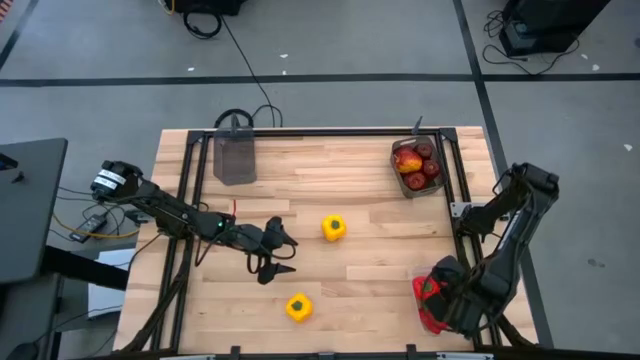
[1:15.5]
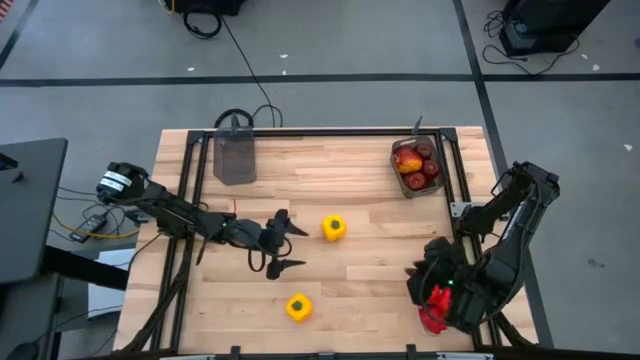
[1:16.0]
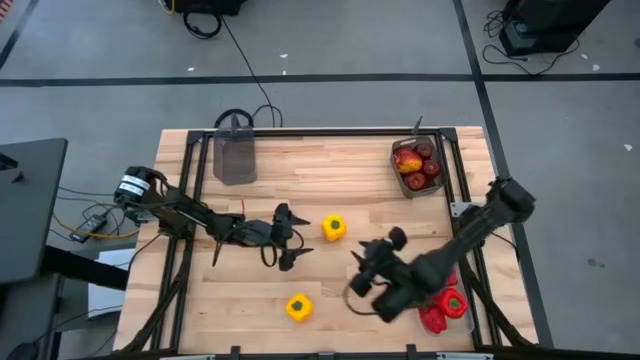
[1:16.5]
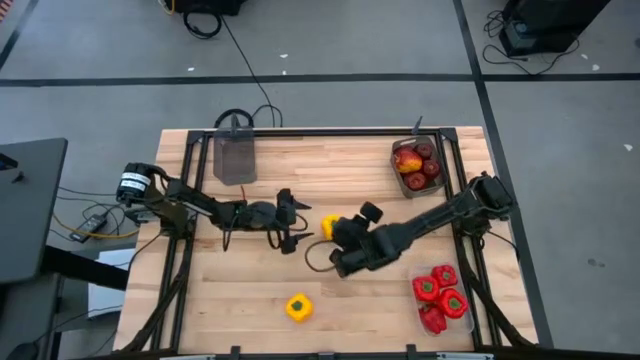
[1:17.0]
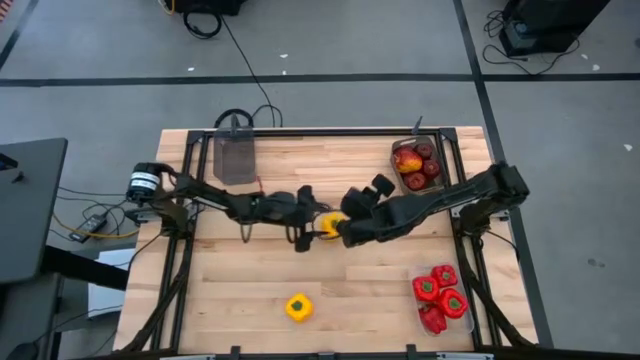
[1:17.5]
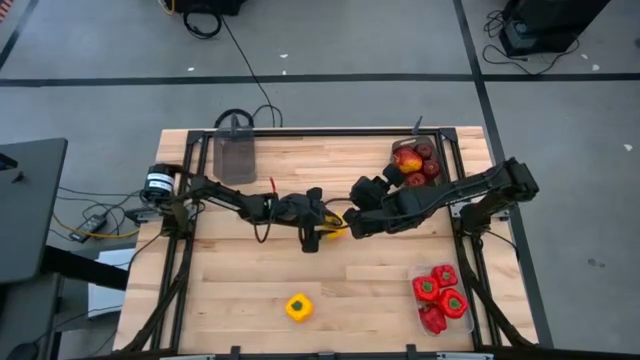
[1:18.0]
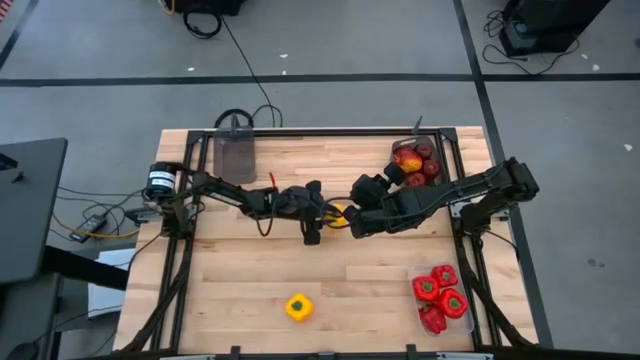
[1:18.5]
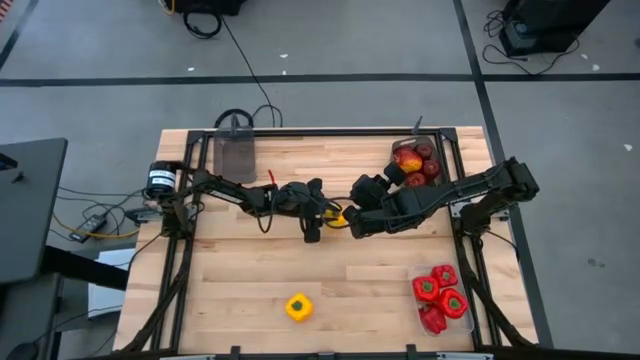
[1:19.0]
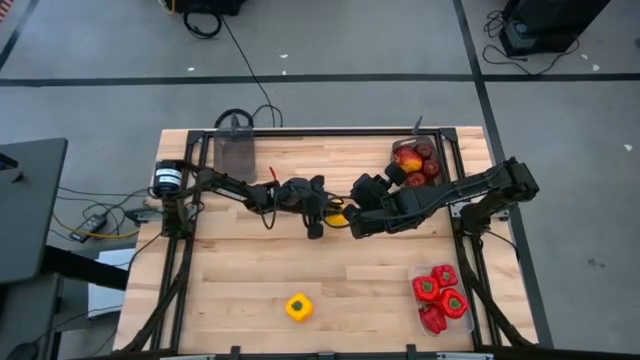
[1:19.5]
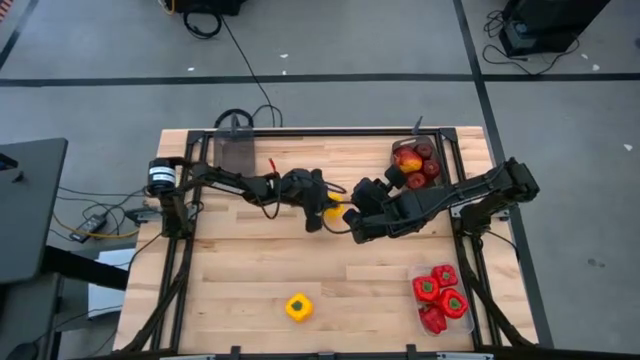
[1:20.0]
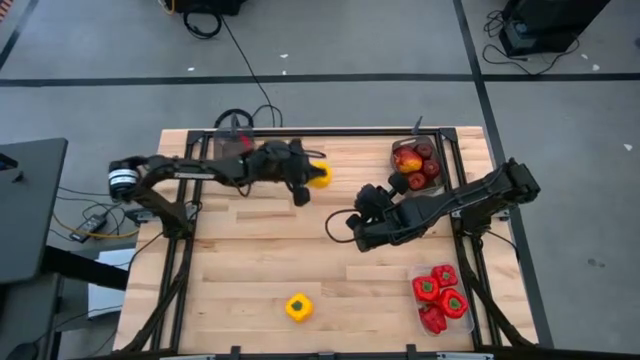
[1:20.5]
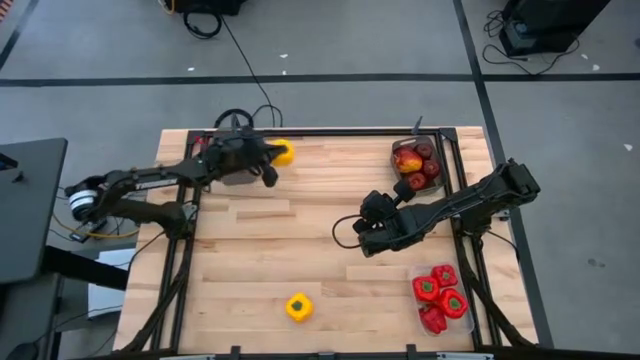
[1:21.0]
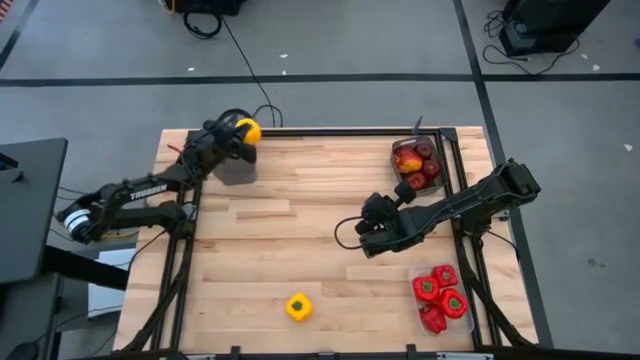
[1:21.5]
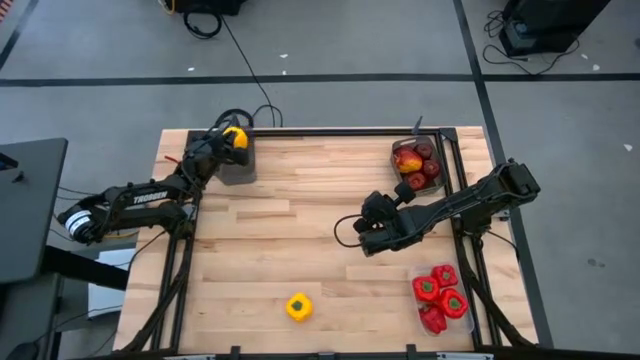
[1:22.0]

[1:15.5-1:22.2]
Task: Sort produce into baskets
Put the top yellow bell pepper into the left dark gray bin

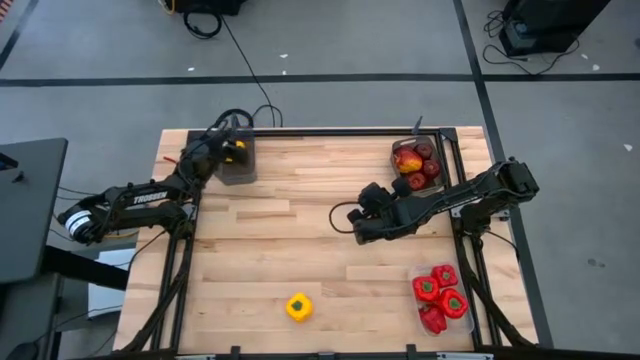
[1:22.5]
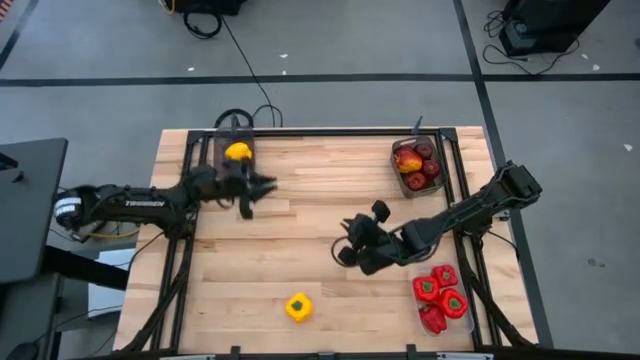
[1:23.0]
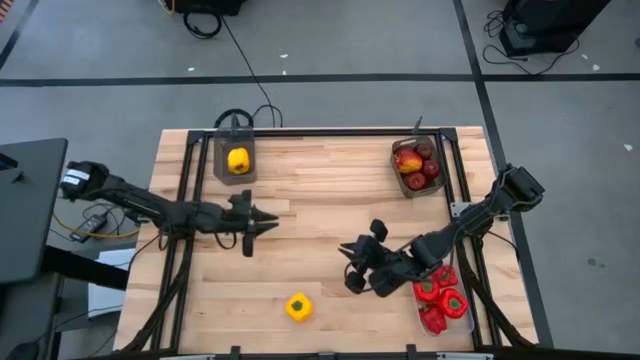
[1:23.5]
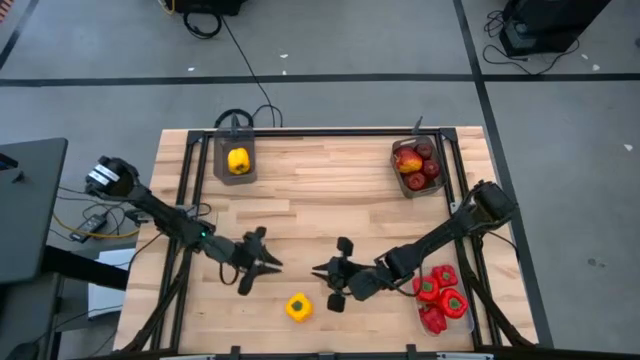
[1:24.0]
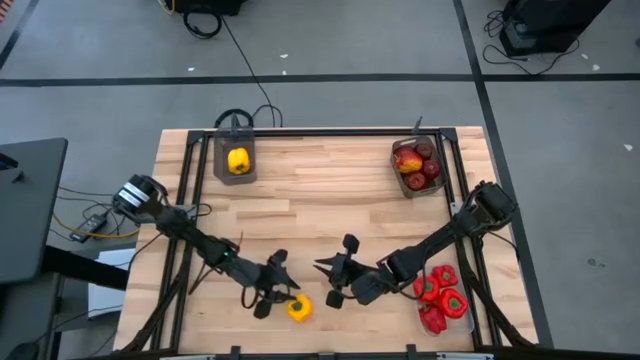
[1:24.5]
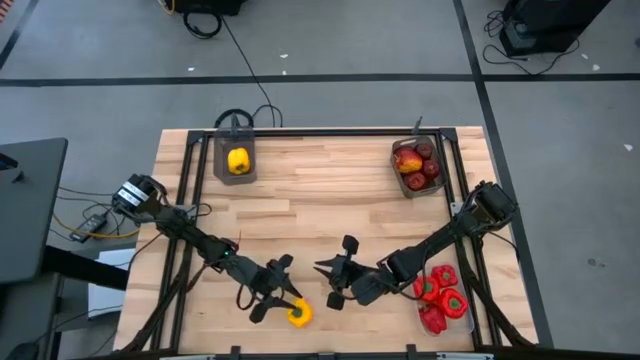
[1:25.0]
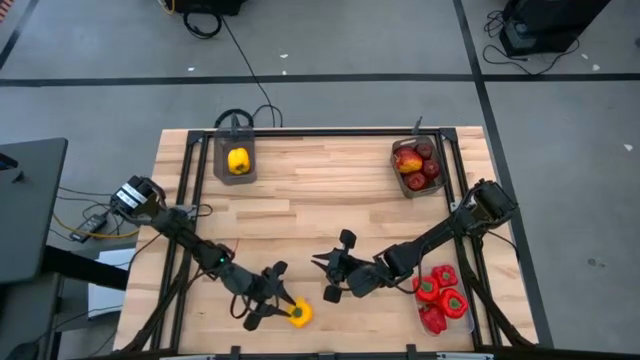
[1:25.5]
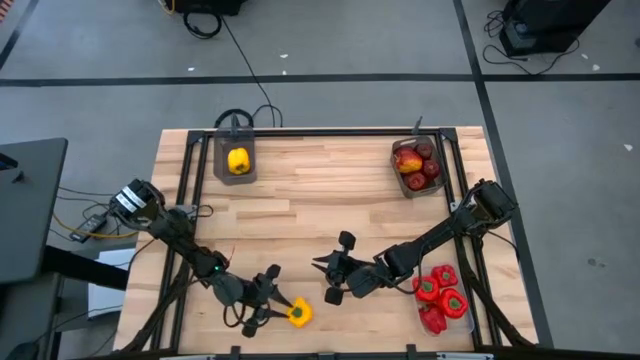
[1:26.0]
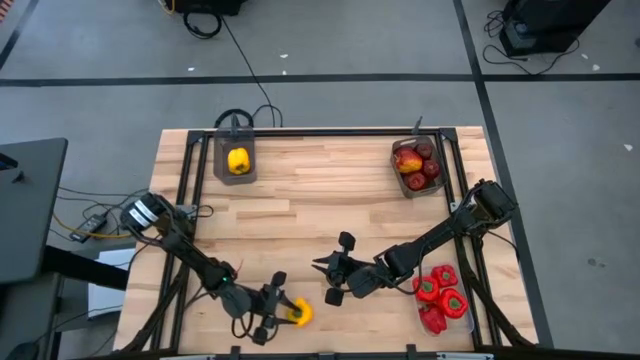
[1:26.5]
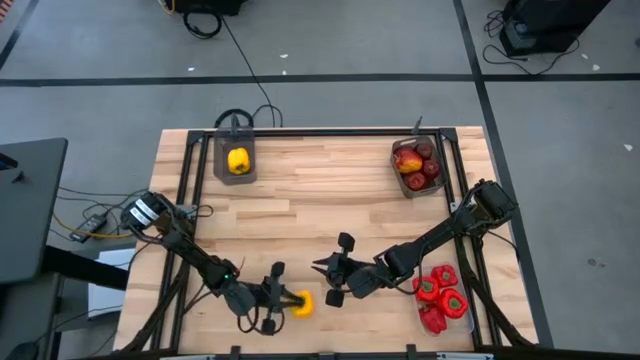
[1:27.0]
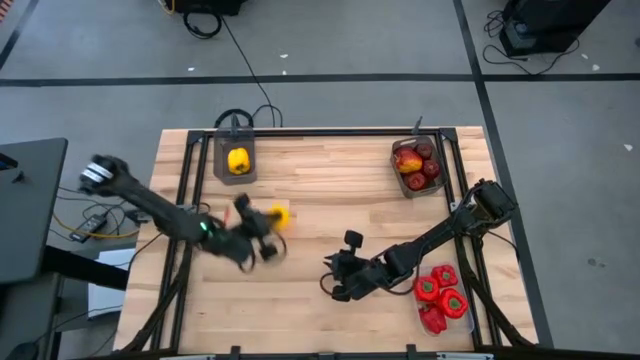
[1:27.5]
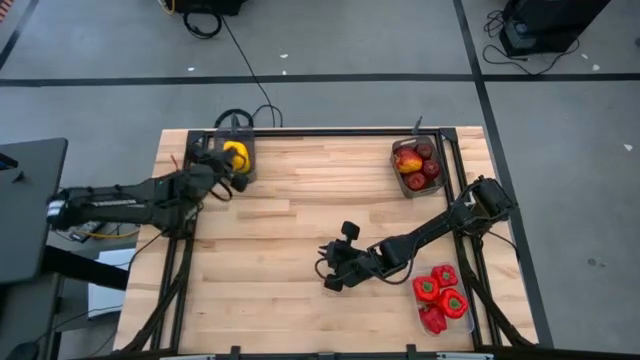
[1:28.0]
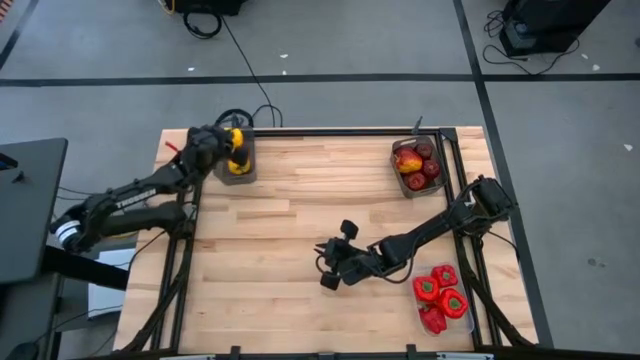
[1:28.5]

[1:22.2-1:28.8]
Put the yellow bell pepper into the left dark gray bin

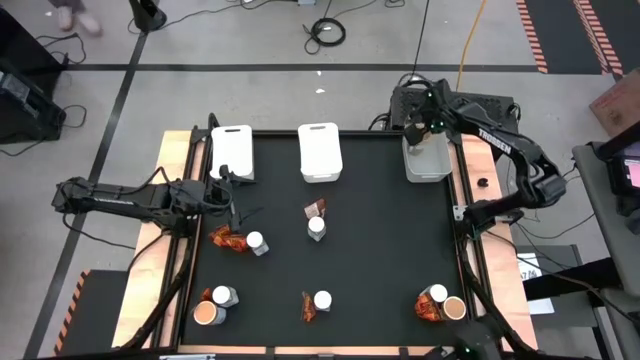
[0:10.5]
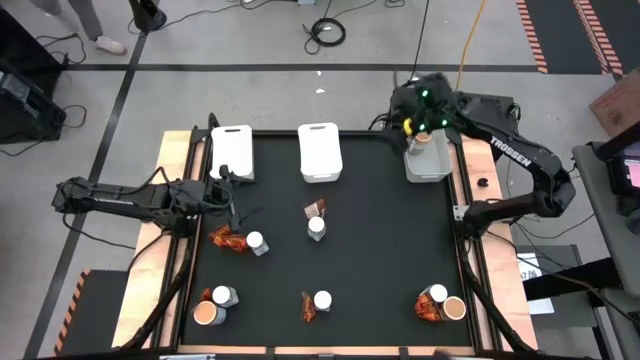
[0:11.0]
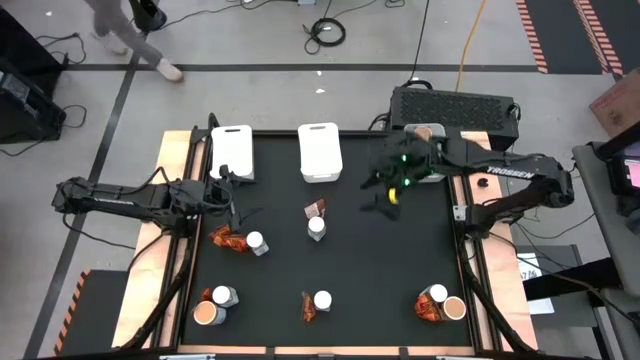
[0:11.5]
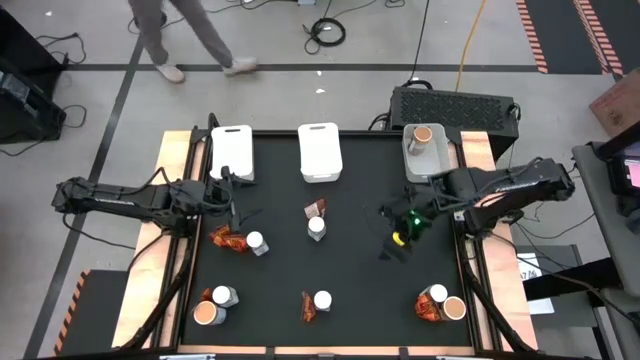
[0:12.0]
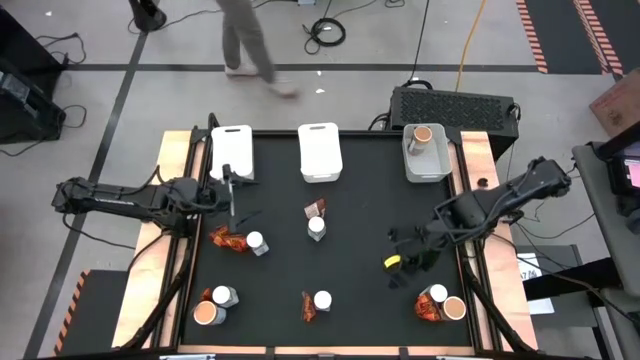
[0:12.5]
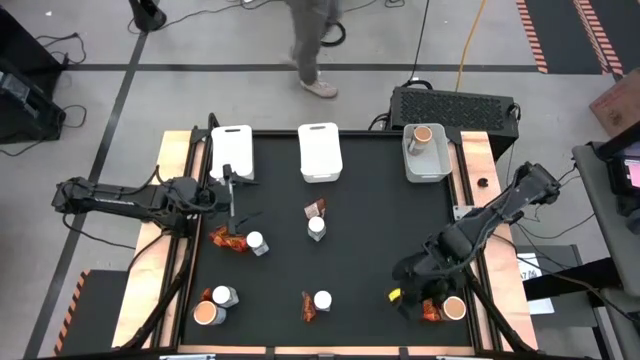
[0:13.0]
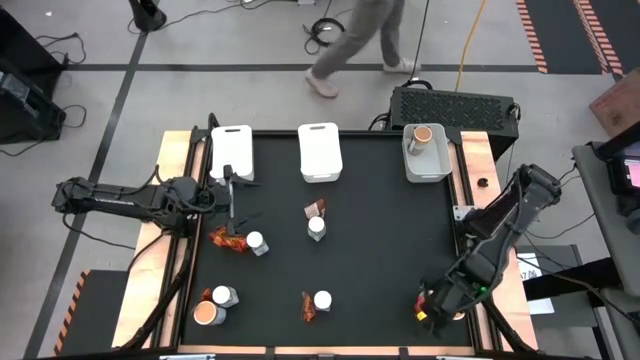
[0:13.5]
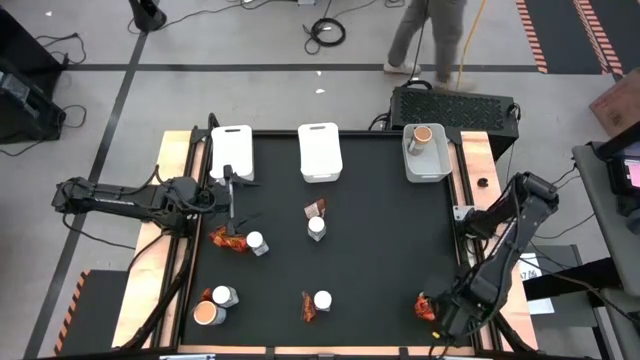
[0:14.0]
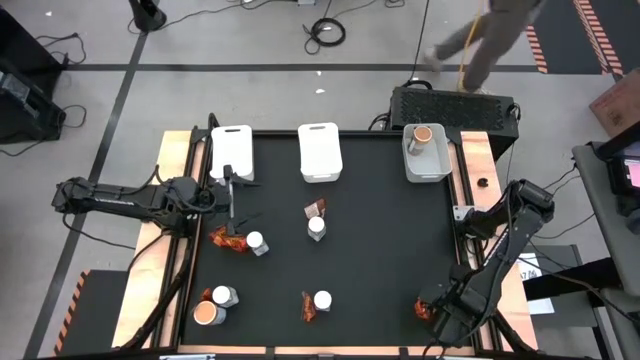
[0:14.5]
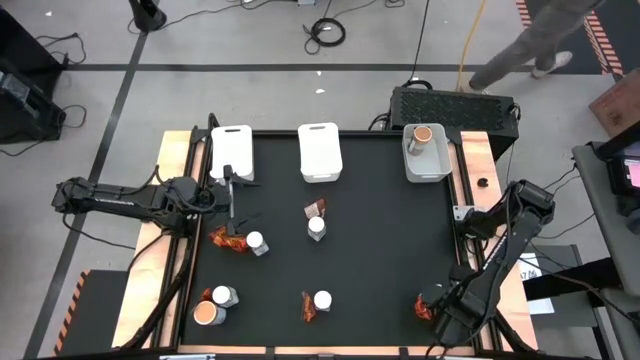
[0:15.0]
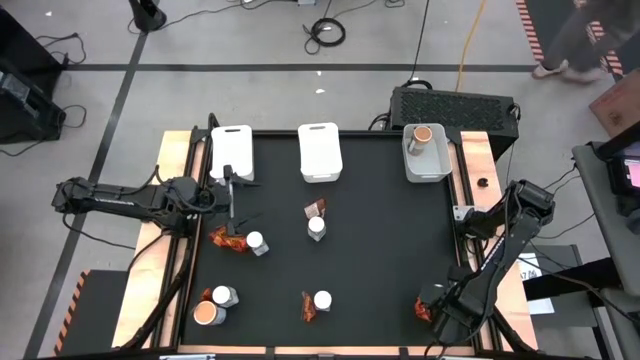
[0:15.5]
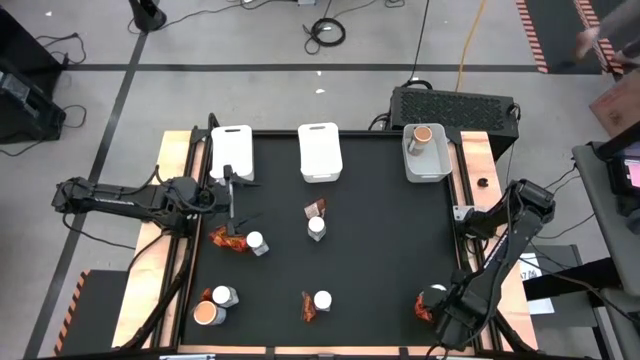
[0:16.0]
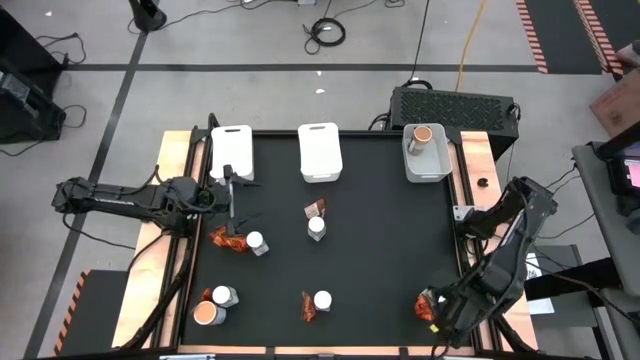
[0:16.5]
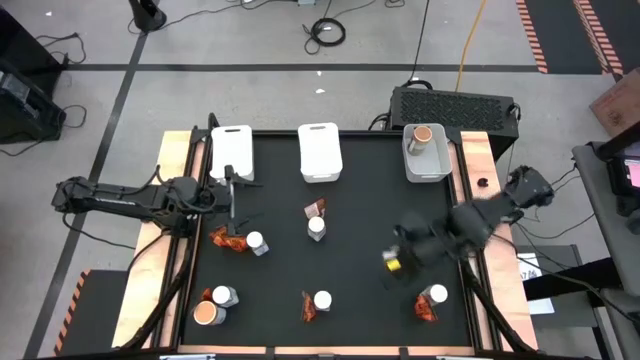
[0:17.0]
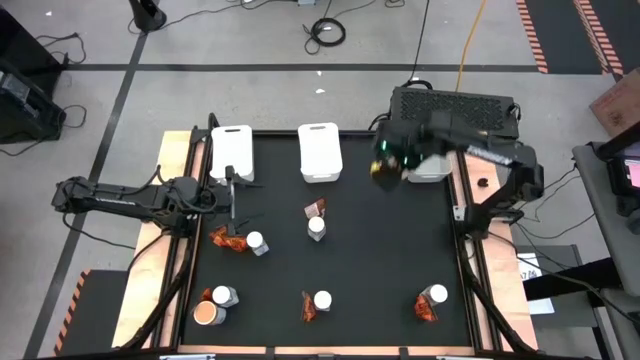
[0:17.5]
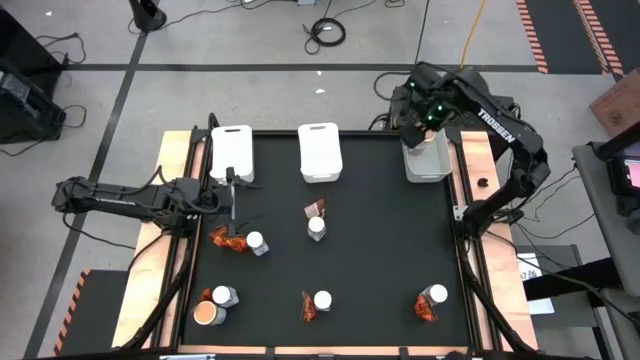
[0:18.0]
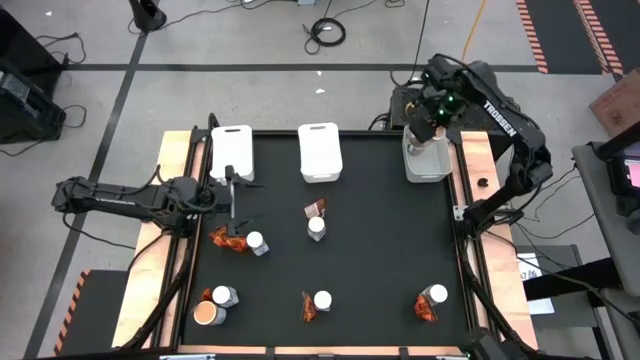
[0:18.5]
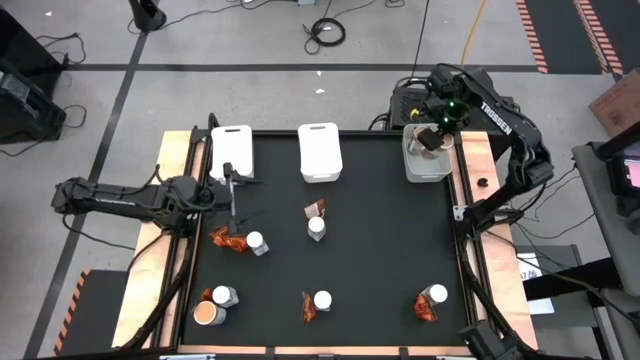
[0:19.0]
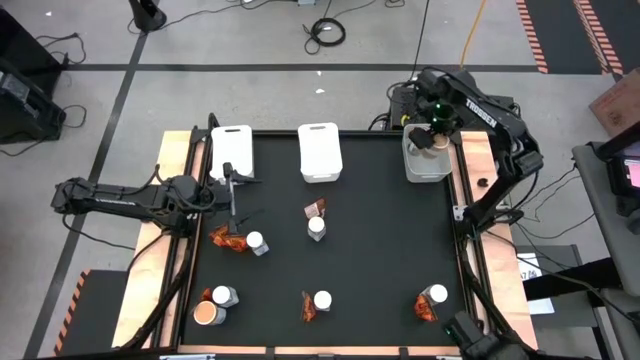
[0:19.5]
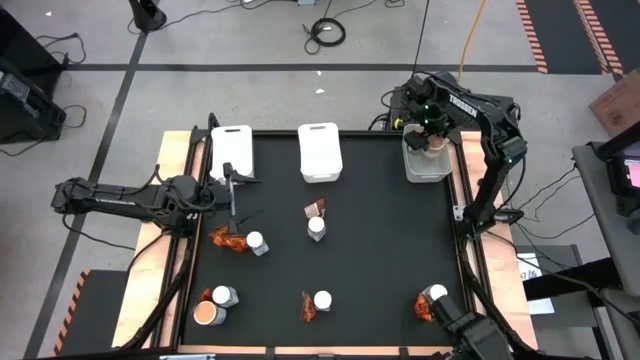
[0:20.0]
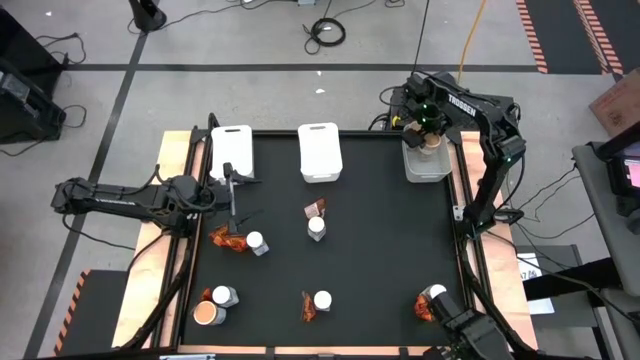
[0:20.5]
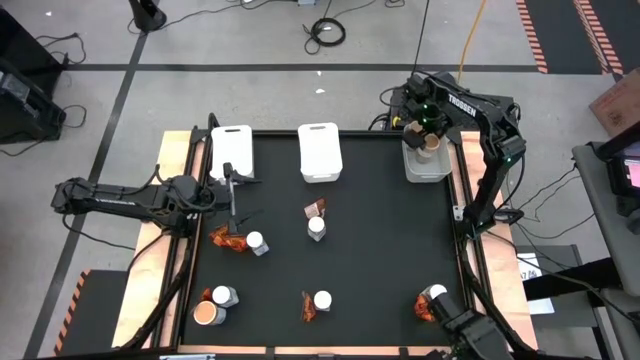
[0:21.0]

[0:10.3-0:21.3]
Task: Sort spices by type
Put the gold seasoning bottle into the gray bin
